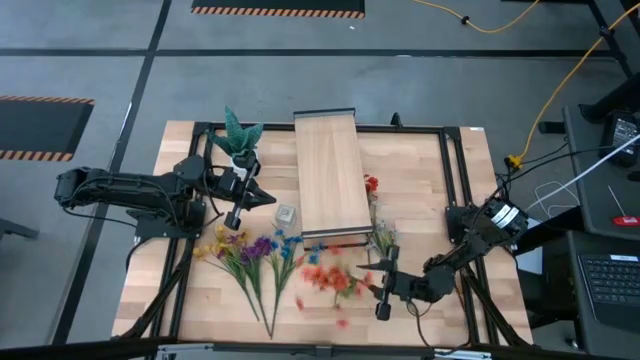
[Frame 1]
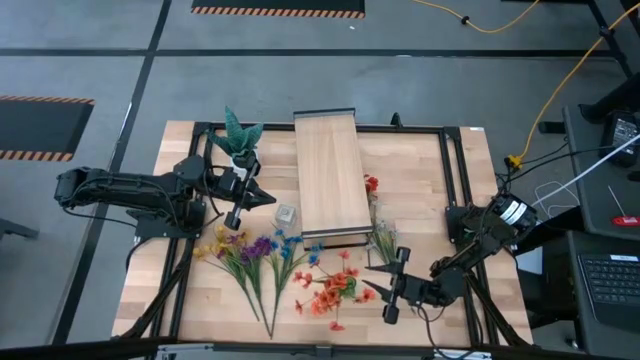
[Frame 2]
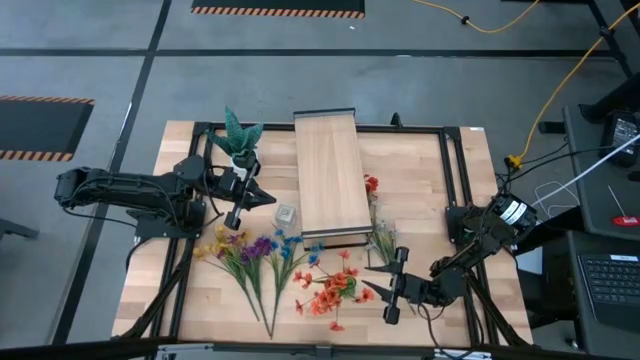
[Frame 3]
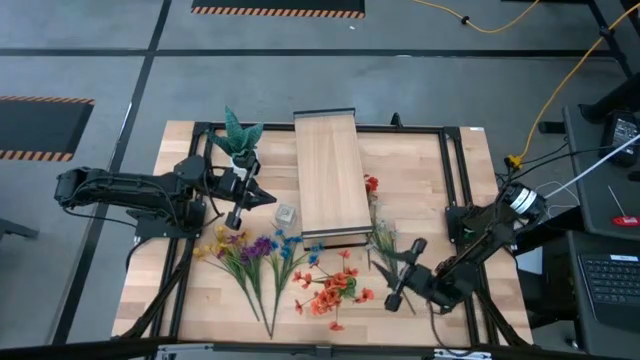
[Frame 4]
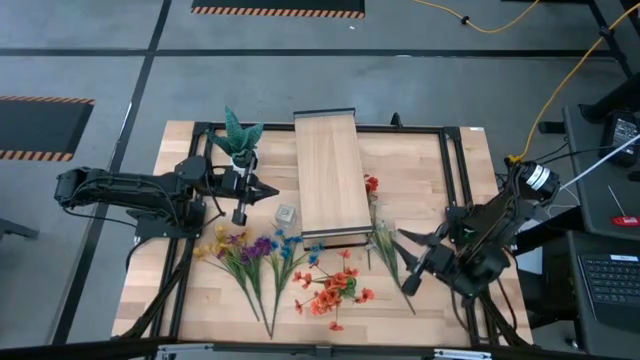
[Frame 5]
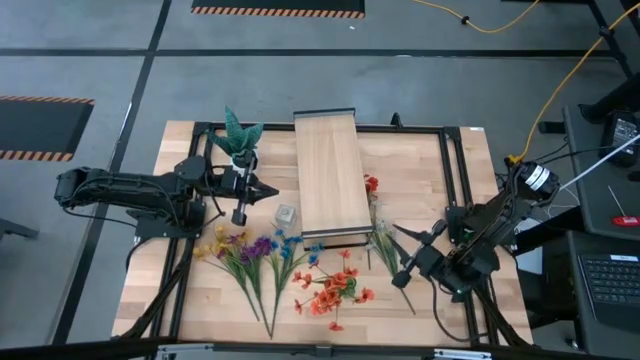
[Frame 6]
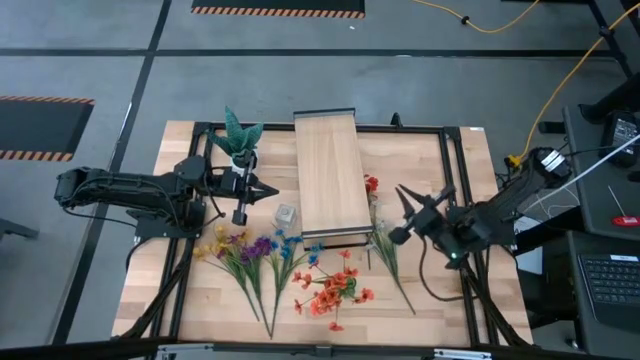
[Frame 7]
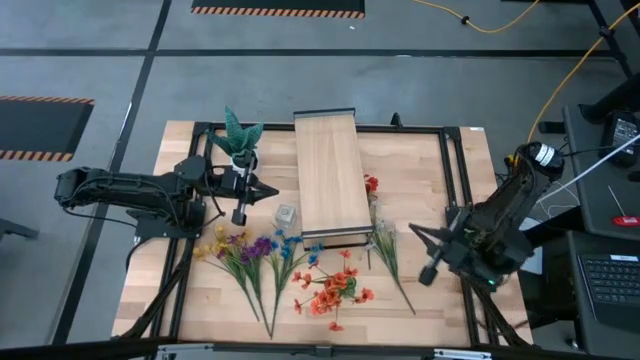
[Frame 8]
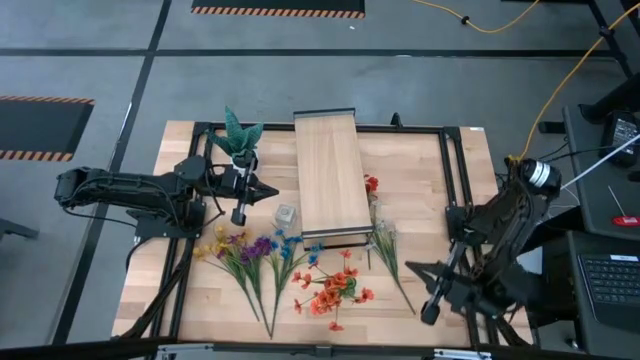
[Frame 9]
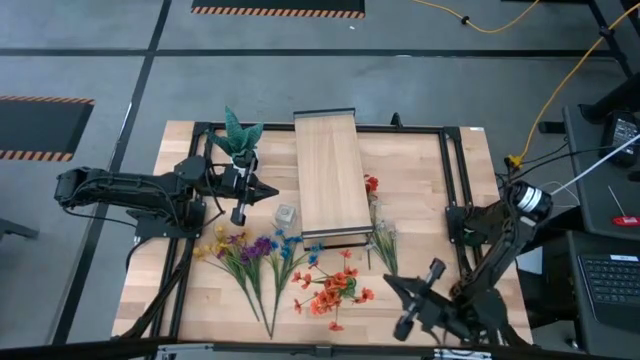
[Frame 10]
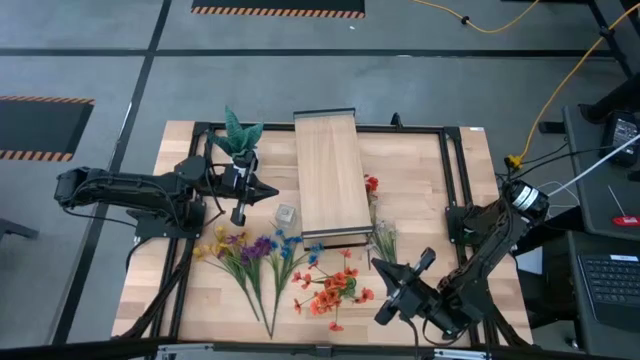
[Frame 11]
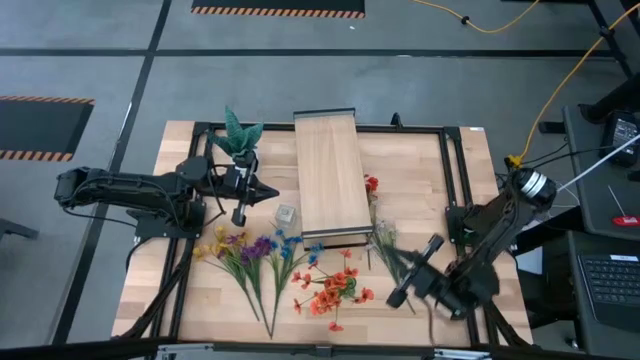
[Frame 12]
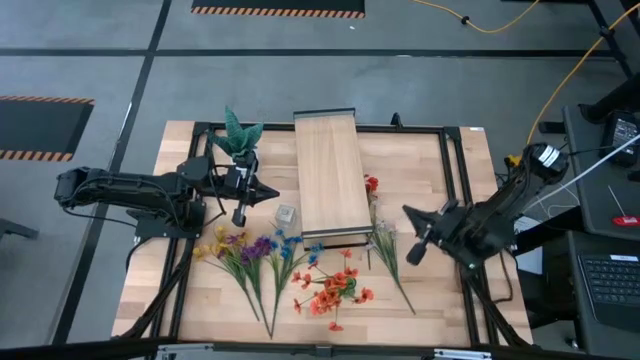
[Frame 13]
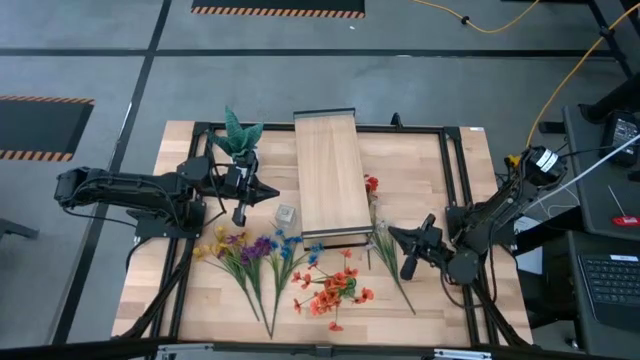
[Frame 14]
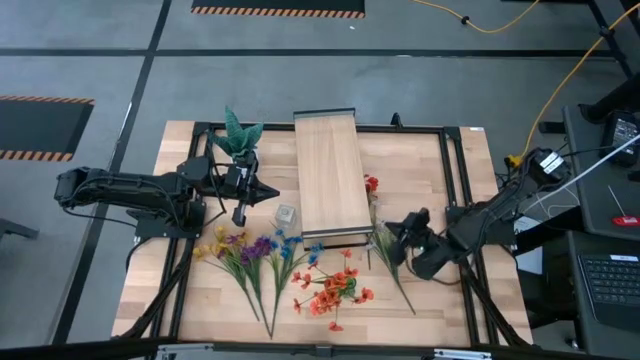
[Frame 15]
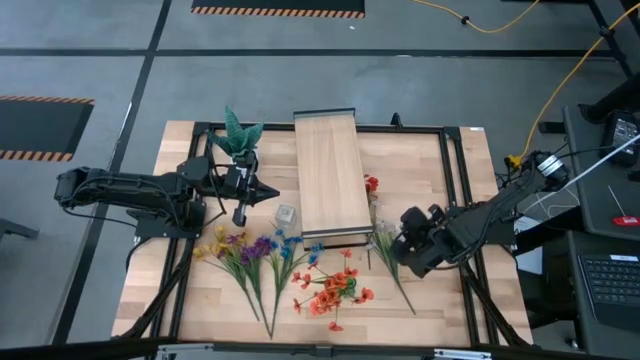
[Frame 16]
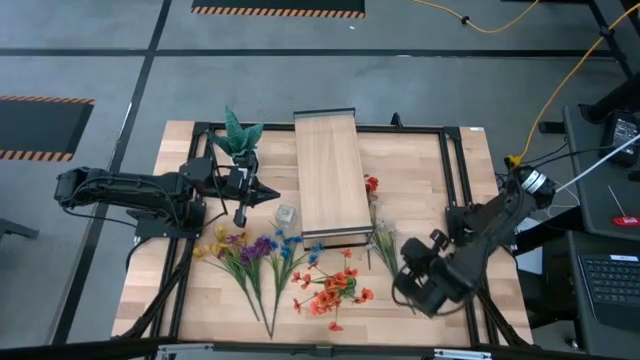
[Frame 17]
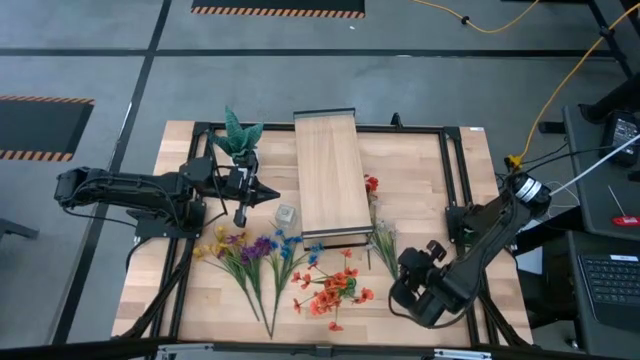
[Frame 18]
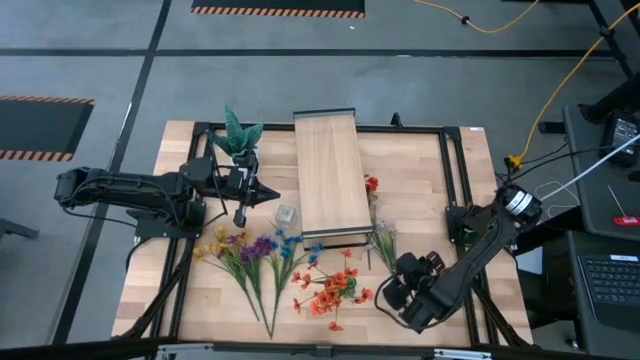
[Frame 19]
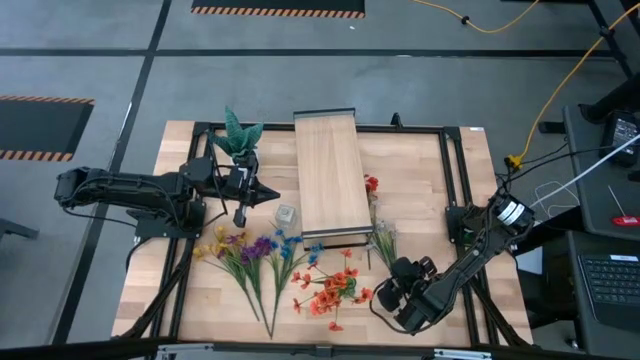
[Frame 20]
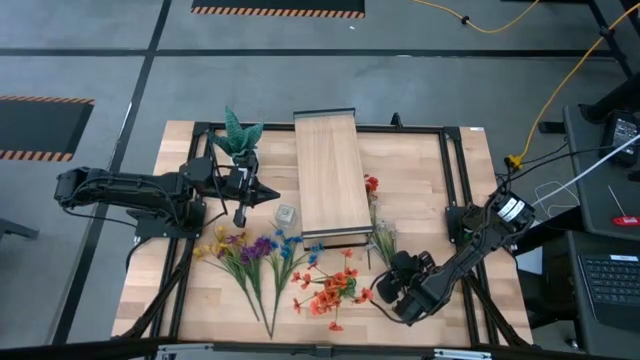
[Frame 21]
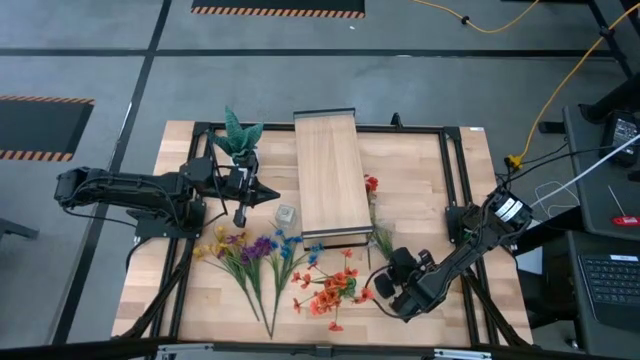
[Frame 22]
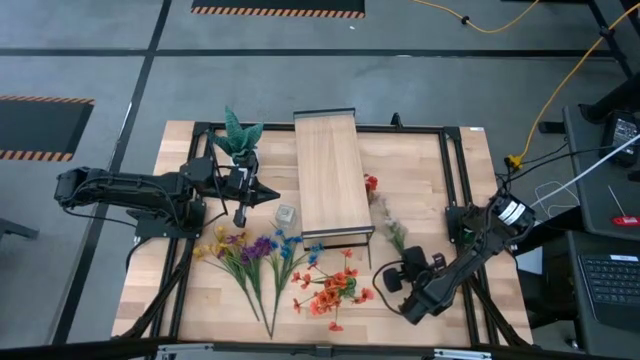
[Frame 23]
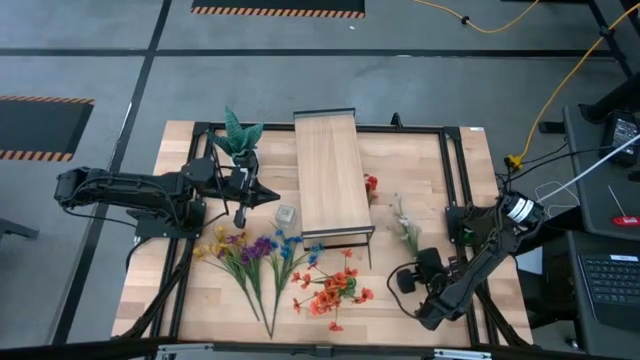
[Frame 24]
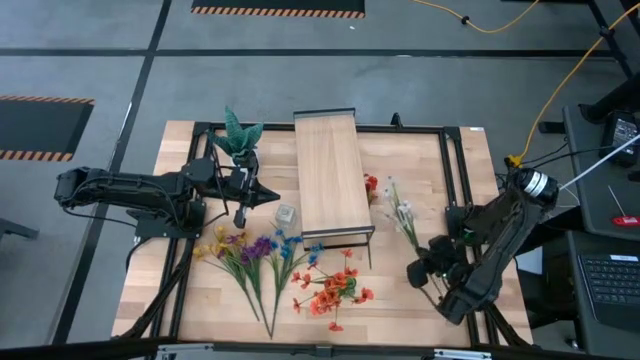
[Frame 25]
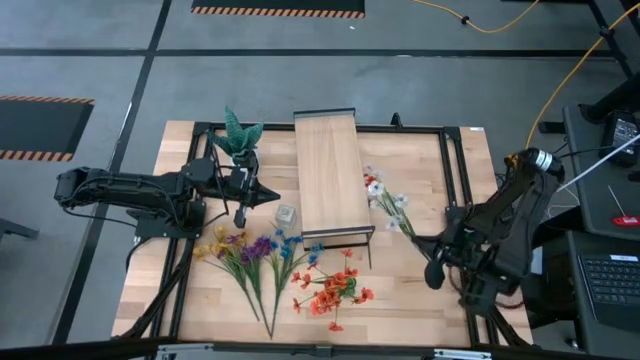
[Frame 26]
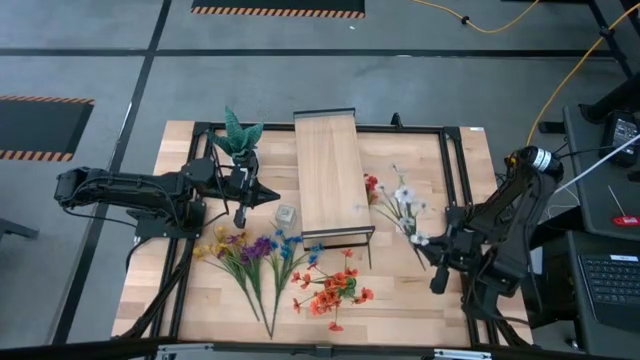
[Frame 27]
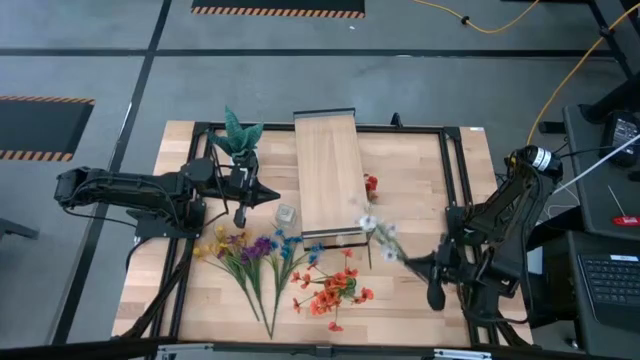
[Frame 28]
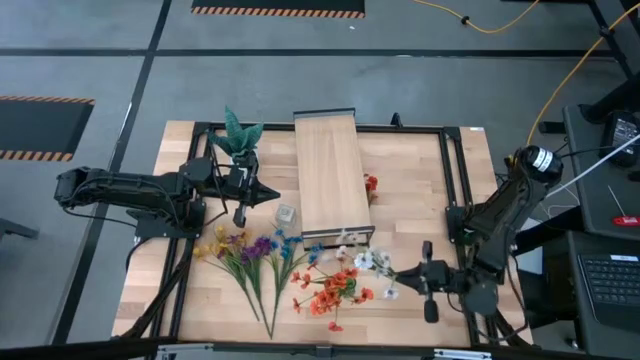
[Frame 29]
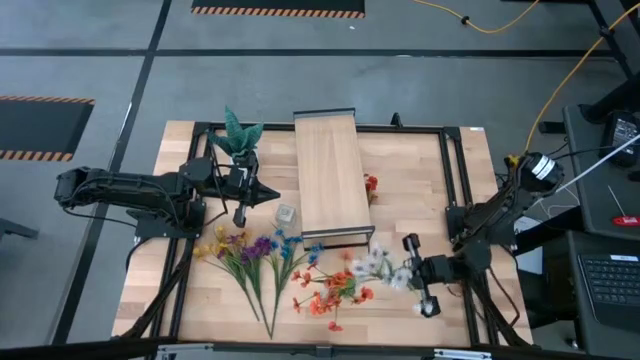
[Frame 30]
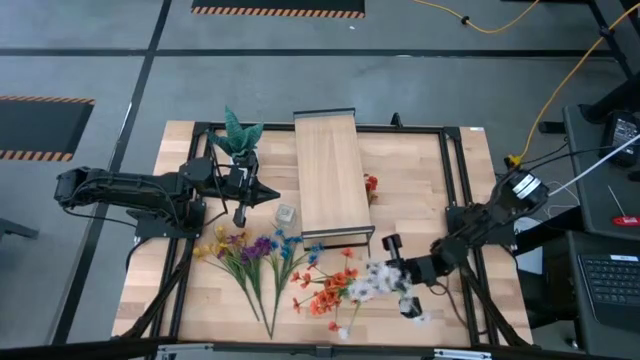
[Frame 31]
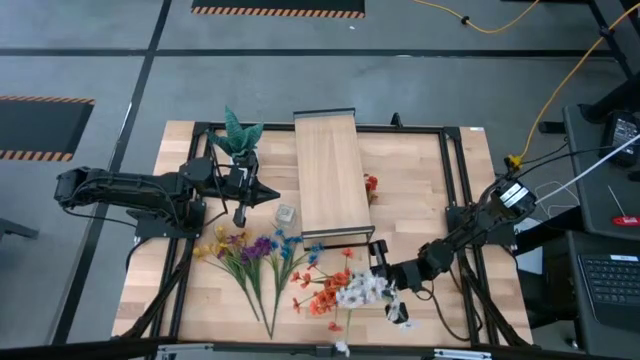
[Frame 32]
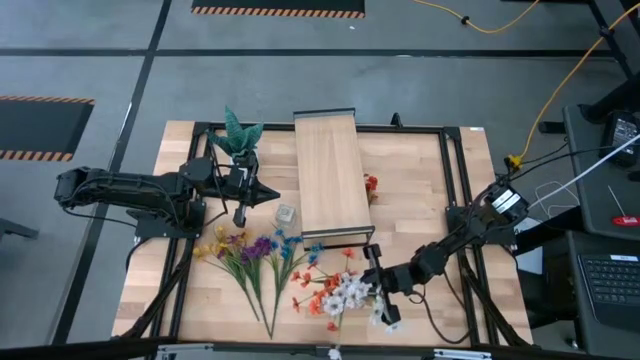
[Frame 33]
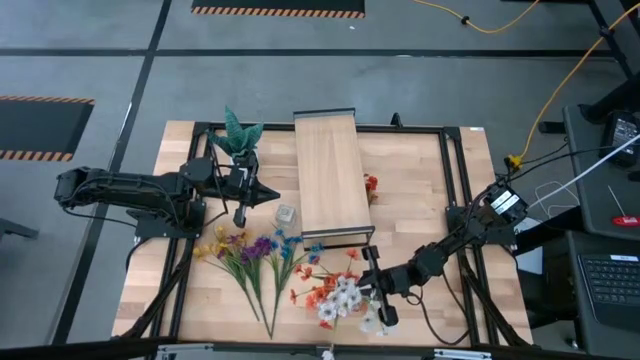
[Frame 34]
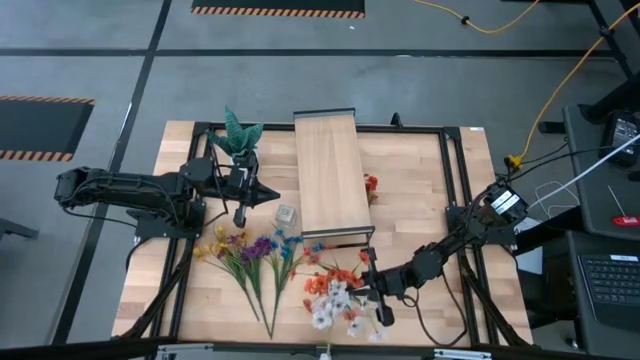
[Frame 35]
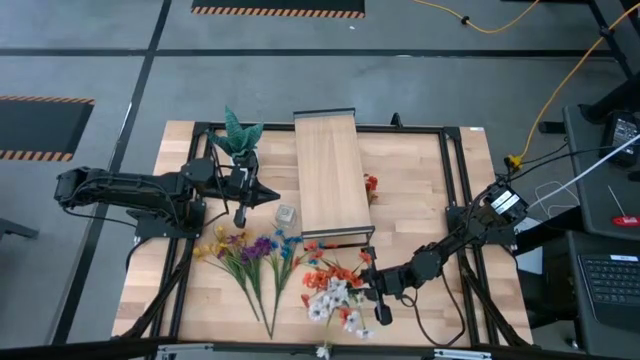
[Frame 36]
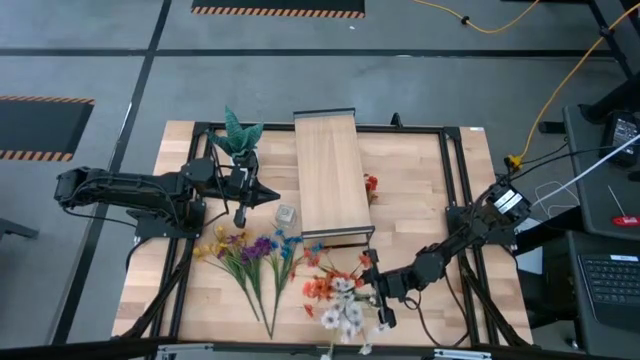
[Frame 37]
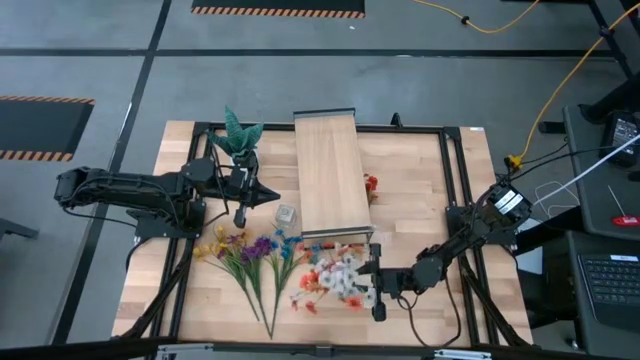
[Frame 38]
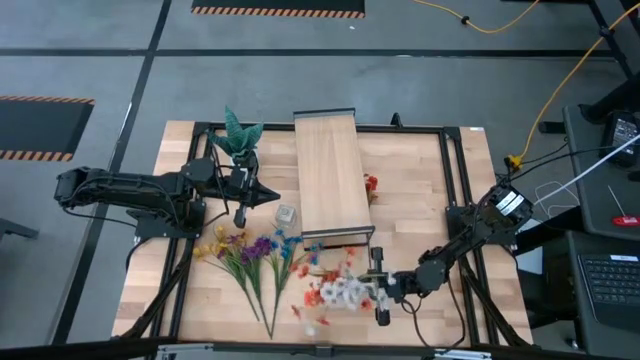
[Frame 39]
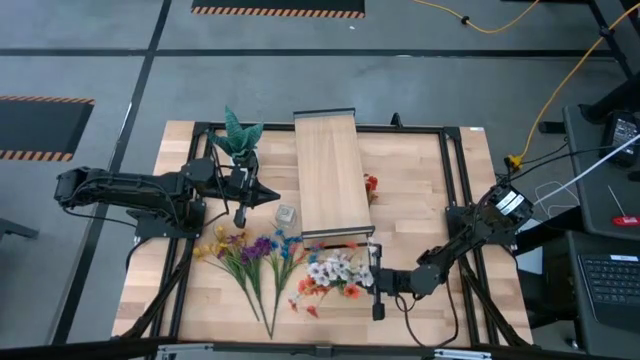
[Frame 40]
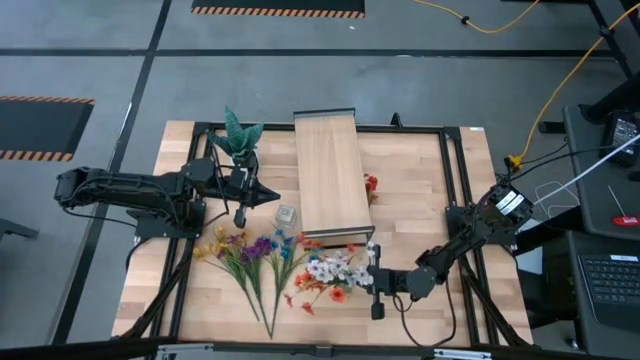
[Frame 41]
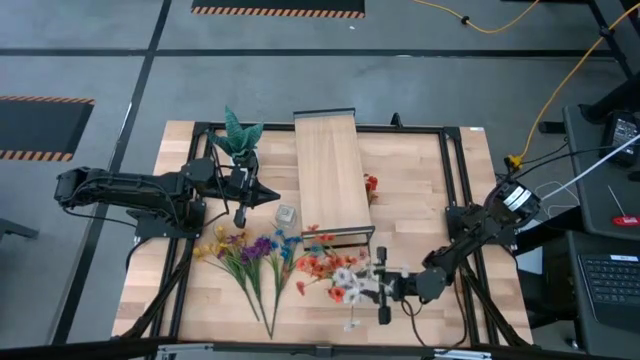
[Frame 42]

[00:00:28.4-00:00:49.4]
Task: Pick and place flowers into a vace then onto a shelf
Put the white flowers into the green vase
